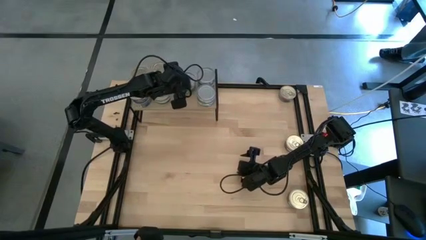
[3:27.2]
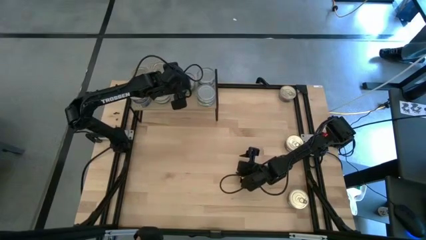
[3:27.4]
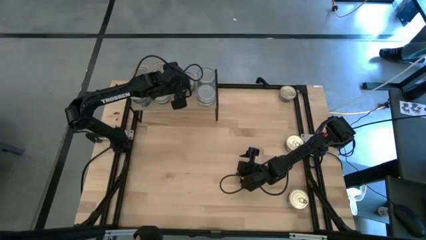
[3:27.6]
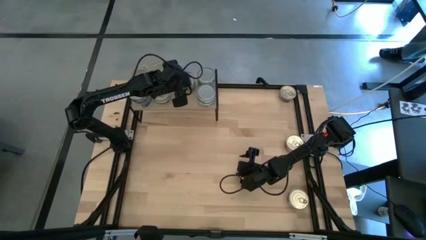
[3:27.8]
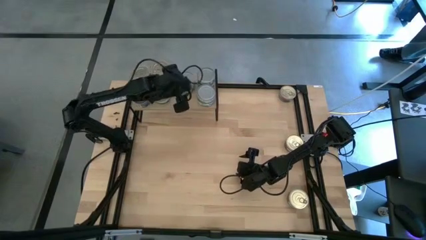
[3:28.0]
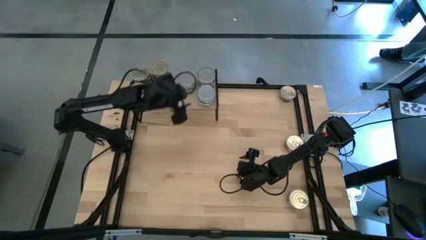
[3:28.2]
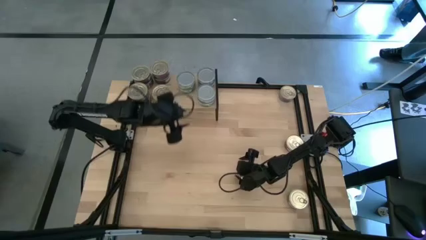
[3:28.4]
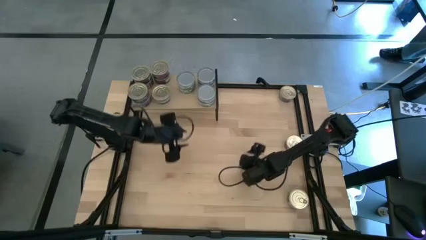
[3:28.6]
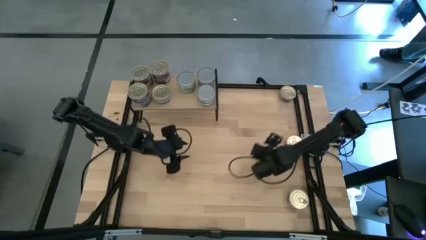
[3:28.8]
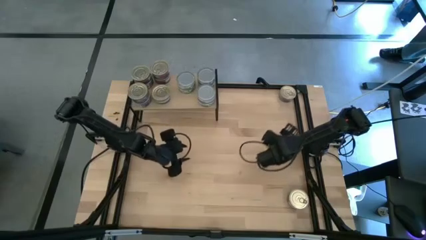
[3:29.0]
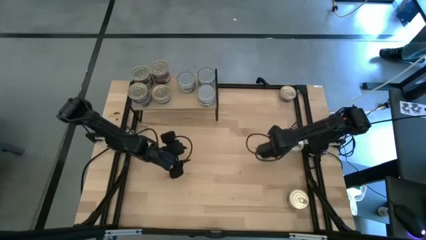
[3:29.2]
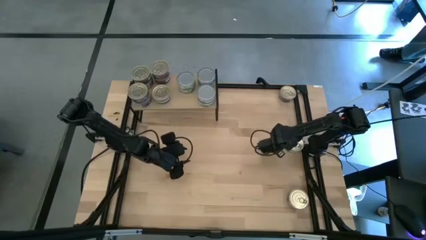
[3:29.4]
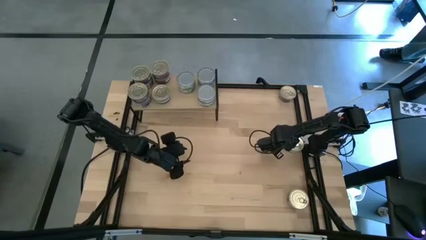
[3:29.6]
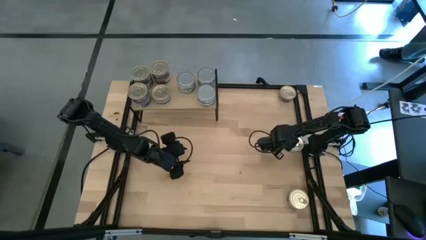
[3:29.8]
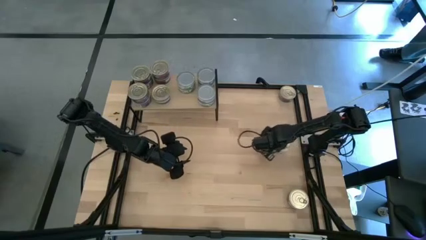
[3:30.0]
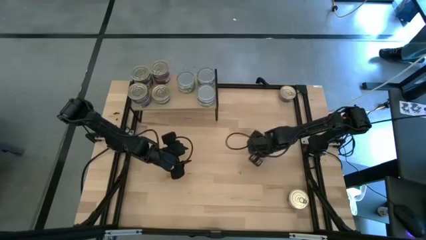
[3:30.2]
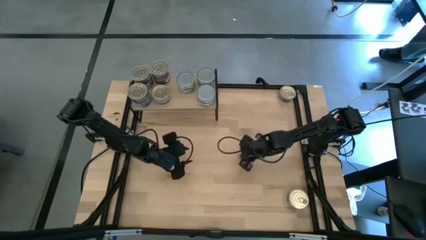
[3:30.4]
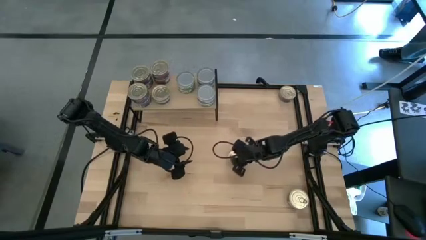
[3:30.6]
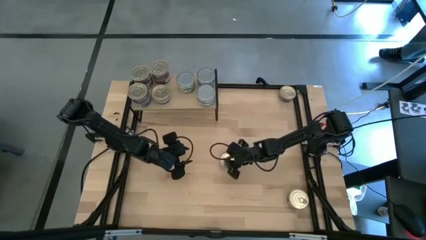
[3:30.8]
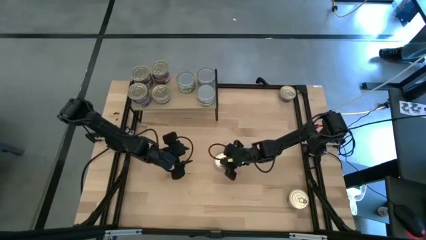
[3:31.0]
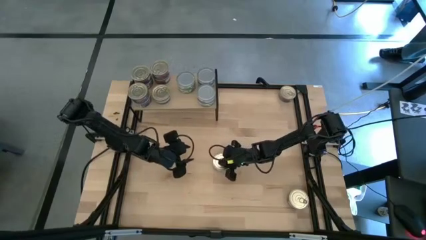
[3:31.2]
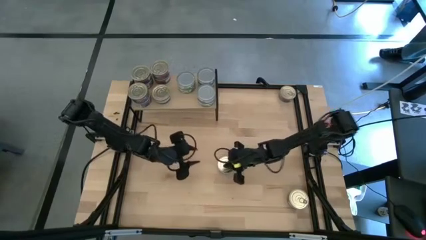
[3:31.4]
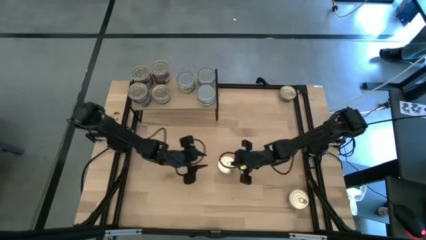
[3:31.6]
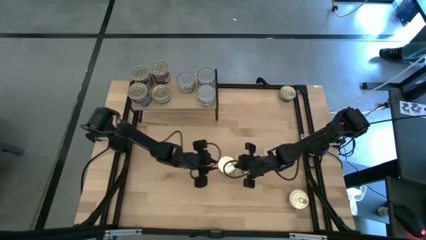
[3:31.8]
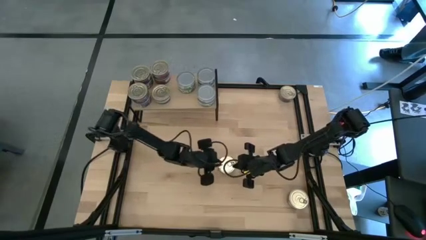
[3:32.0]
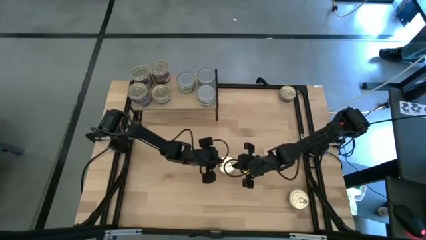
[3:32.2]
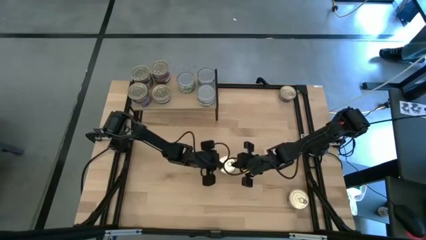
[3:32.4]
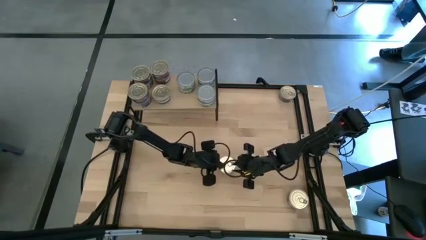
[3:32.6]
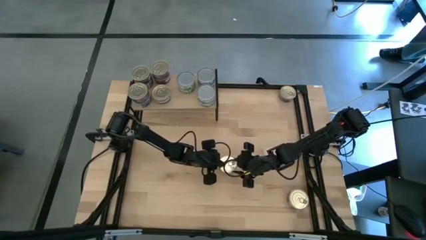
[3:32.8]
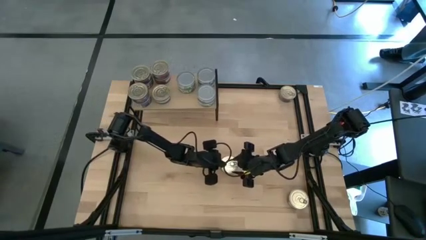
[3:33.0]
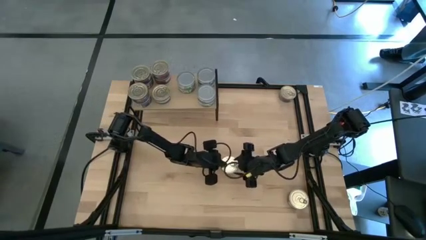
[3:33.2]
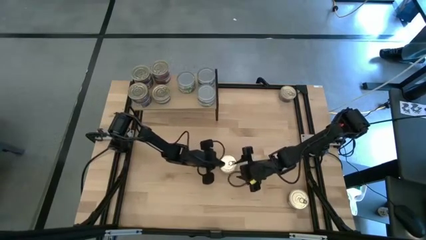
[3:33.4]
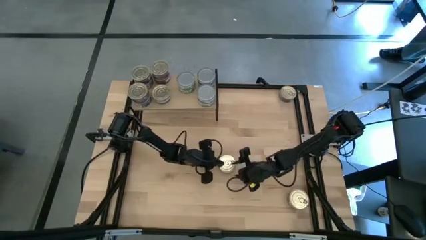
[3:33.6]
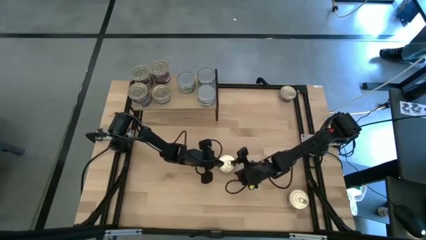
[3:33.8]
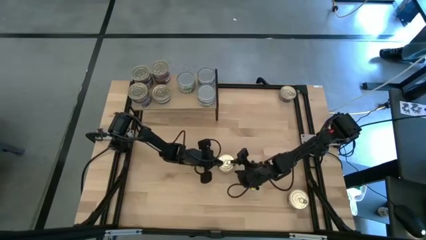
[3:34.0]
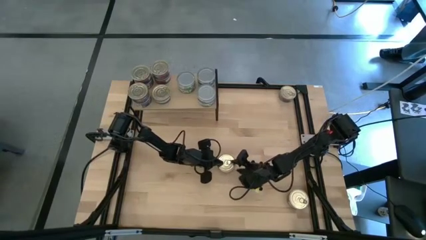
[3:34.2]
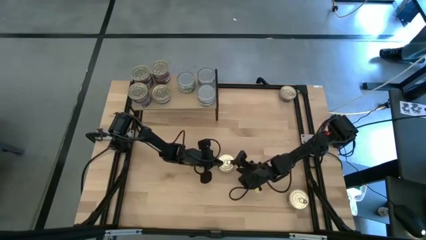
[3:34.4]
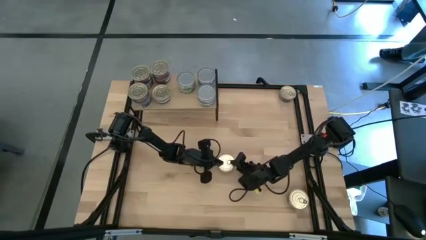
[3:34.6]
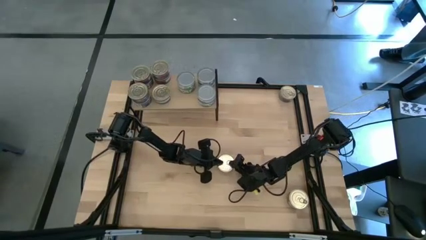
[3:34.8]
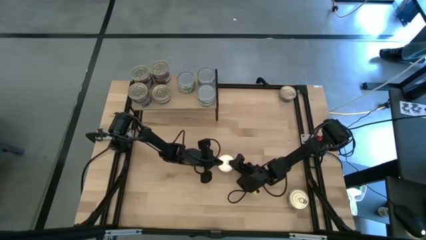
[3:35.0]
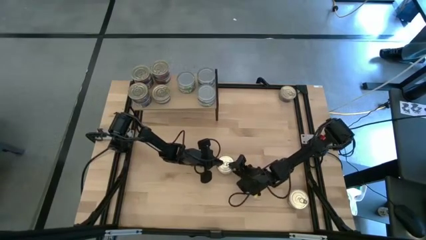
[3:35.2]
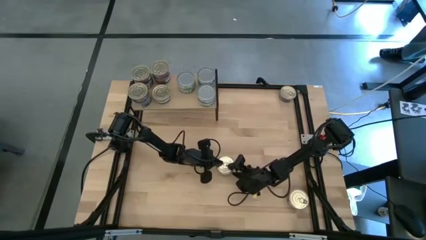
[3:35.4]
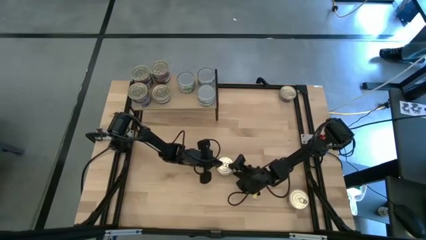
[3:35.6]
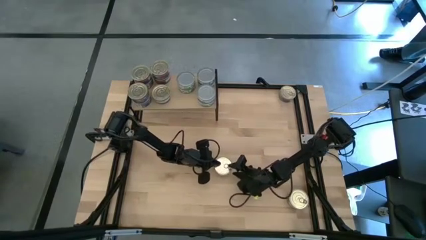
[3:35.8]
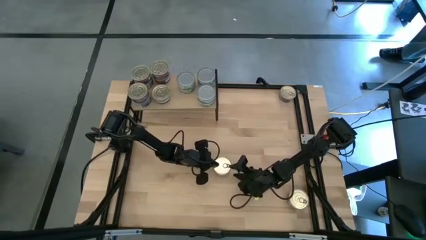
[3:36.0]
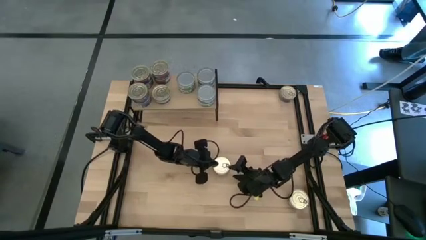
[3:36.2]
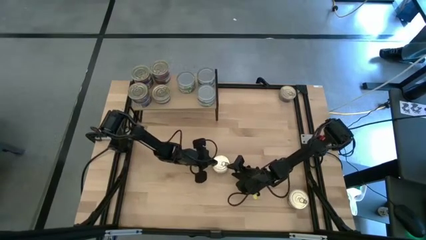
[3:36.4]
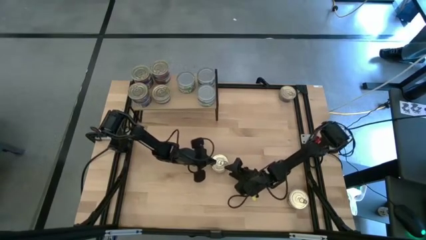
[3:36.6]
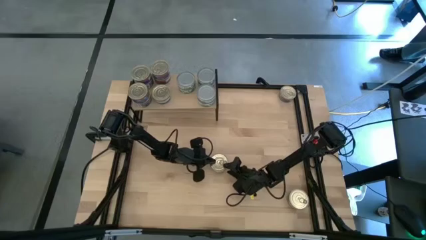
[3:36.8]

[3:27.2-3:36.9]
Task: Stack canned seafood by type on shelf
Stack the blue tuna can on top of the blue tuna can on the shelf

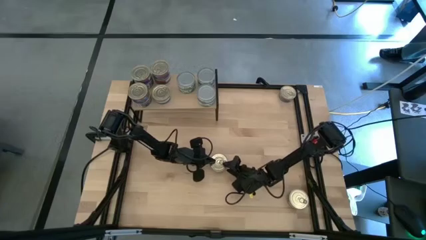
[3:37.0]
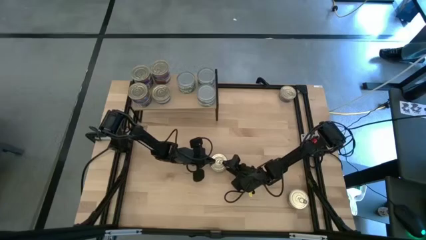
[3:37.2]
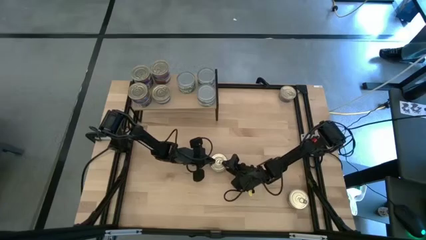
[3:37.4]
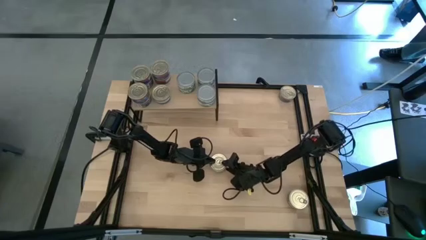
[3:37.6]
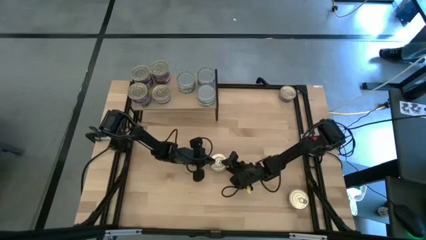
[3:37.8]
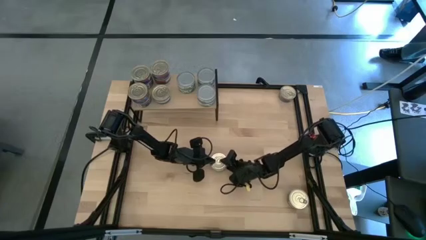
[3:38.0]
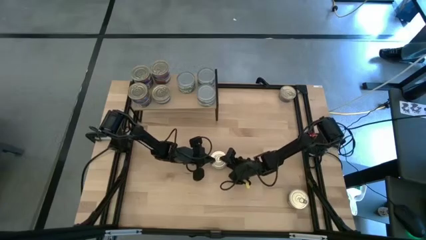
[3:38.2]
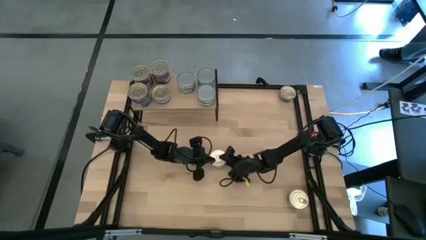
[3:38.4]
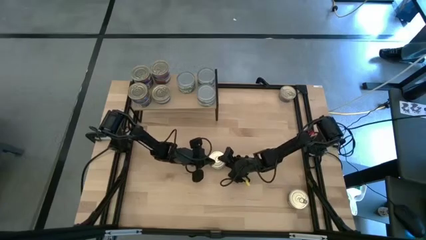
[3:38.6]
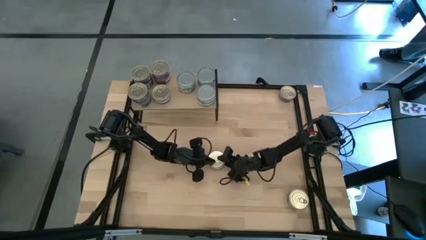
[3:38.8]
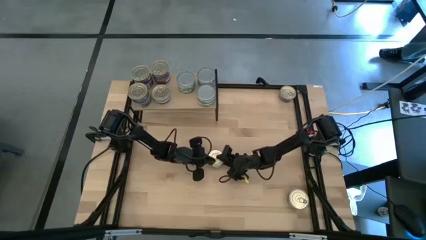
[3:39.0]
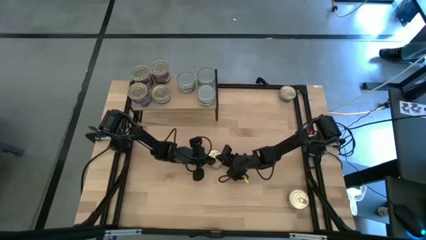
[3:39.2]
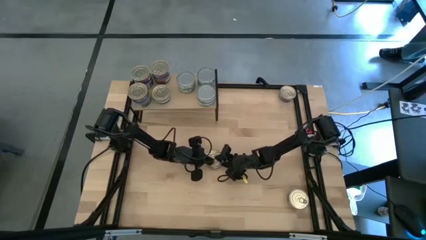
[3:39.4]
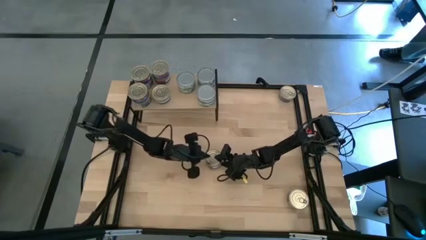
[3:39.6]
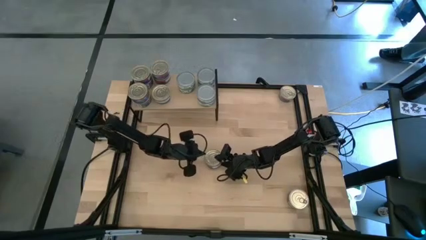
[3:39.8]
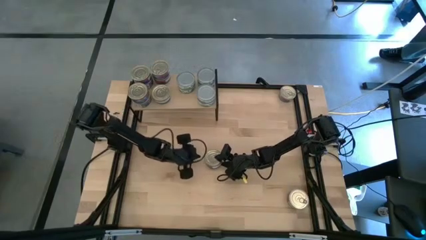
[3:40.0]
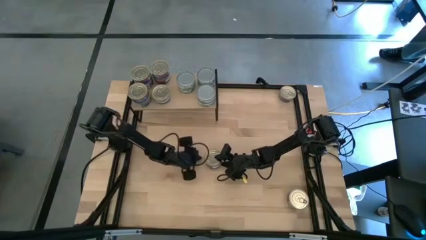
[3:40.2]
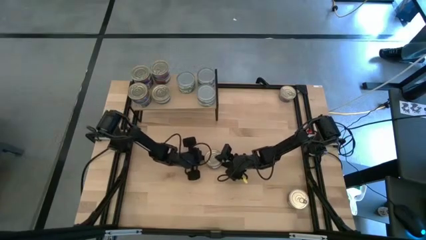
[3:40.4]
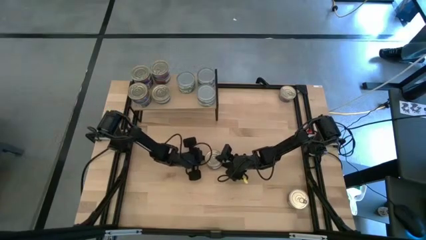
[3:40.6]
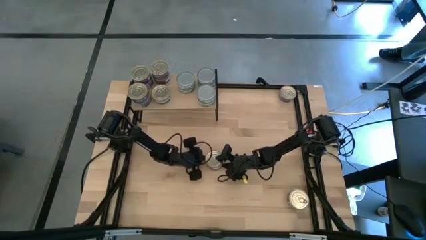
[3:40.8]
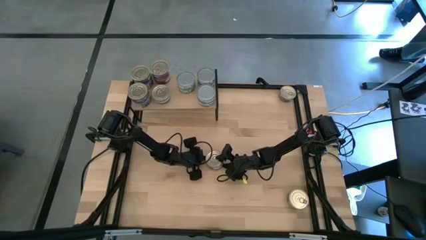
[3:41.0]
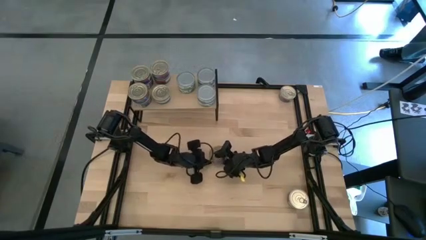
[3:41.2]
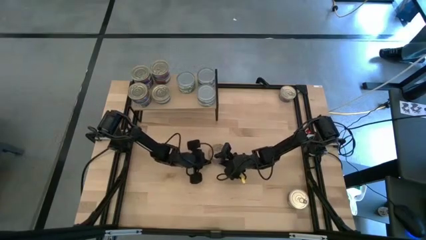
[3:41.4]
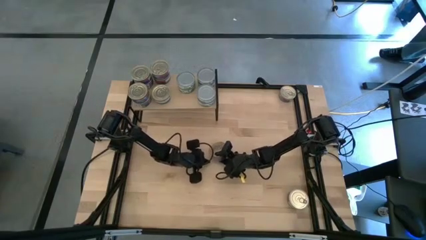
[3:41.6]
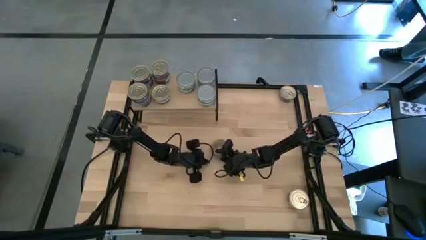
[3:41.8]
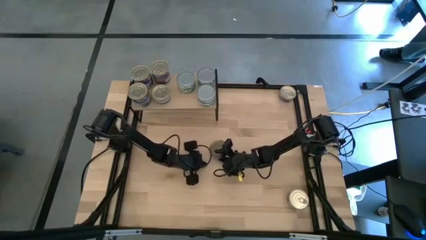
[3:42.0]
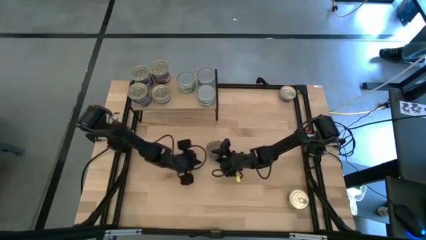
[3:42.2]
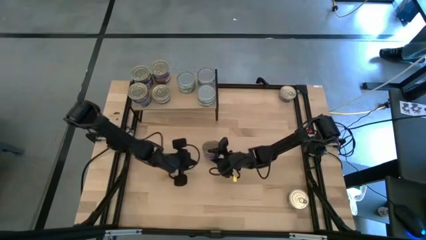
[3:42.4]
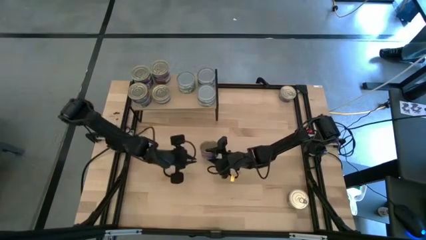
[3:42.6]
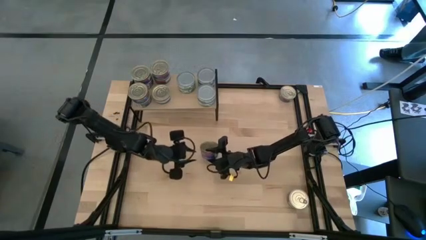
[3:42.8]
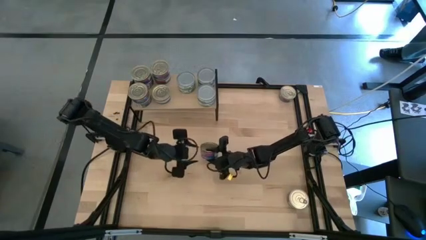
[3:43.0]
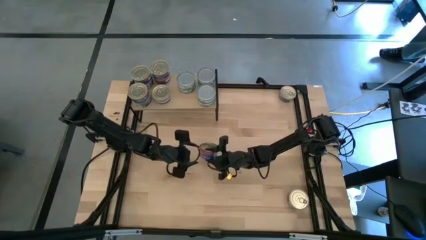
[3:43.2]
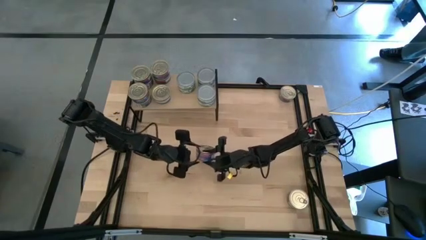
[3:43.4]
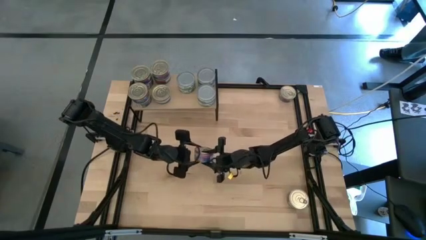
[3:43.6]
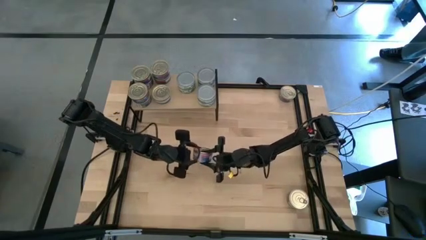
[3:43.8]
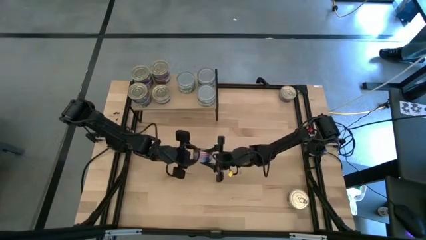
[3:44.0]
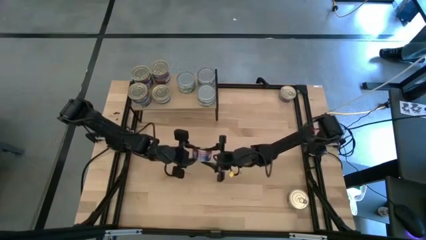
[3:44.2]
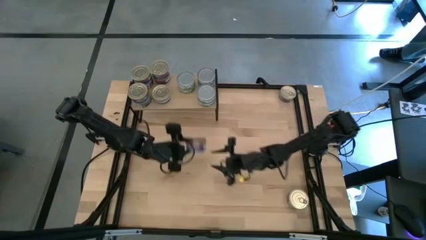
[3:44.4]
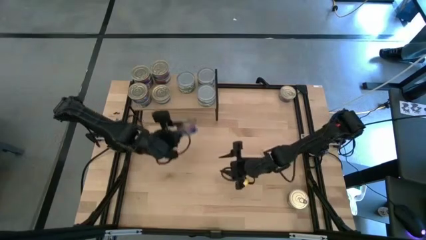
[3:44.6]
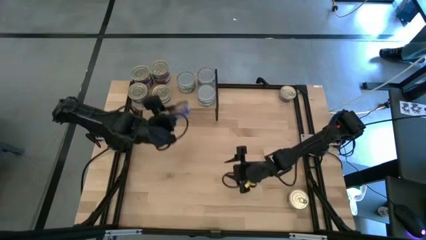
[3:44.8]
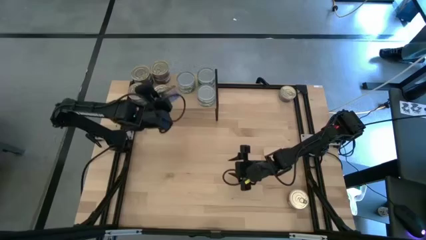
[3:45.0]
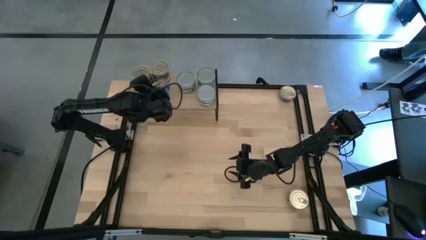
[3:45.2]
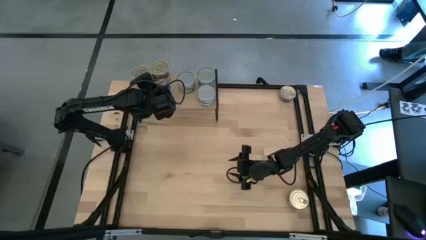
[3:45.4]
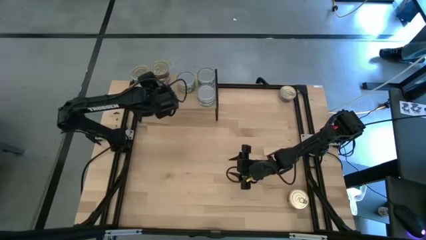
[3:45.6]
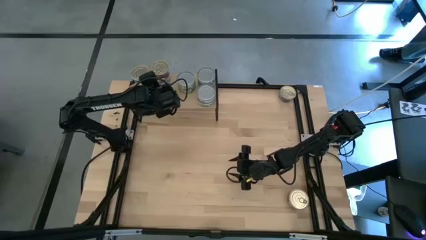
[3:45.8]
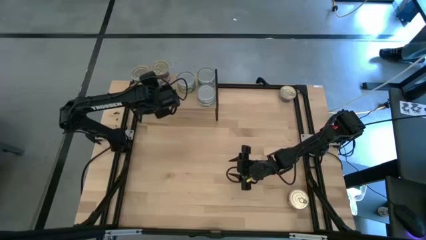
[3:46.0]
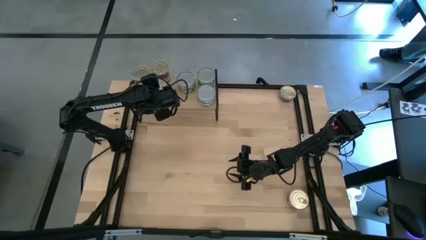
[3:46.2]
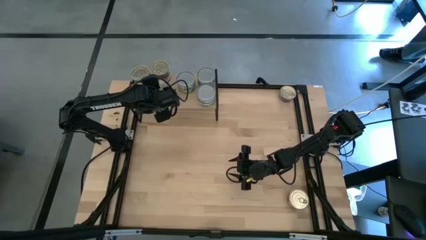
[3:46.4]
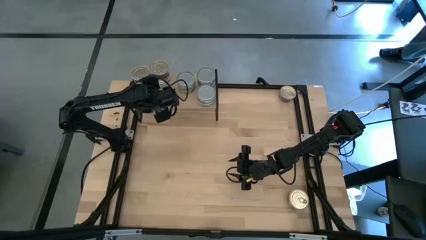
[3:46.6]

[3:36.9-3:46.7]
Stack the blue tuna can on top of the blue tuna can on the shelf
